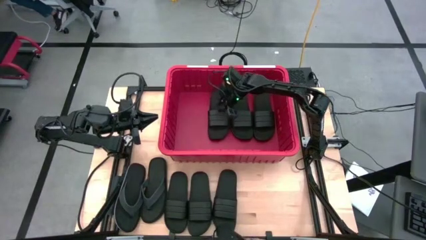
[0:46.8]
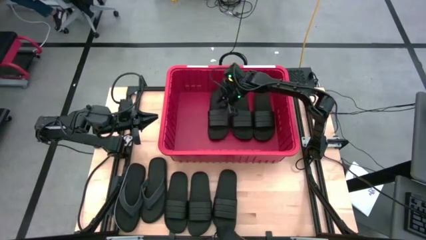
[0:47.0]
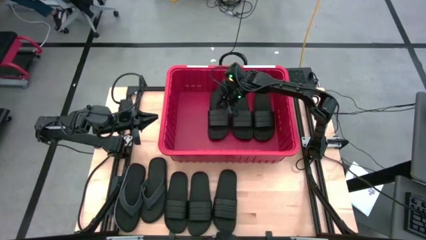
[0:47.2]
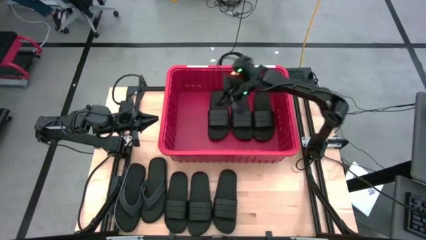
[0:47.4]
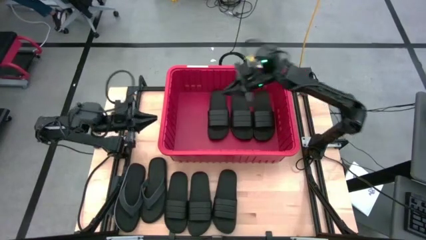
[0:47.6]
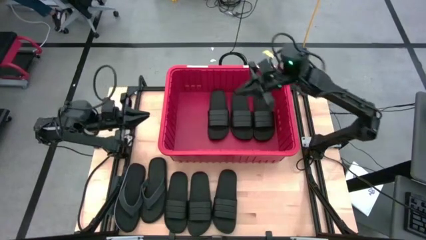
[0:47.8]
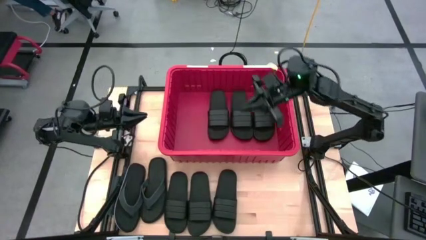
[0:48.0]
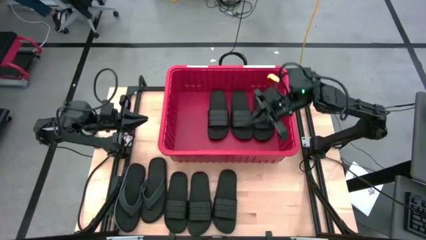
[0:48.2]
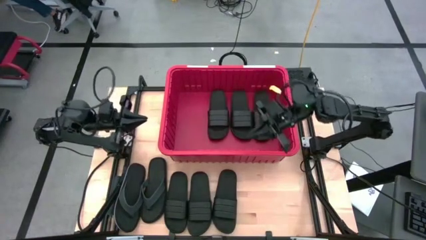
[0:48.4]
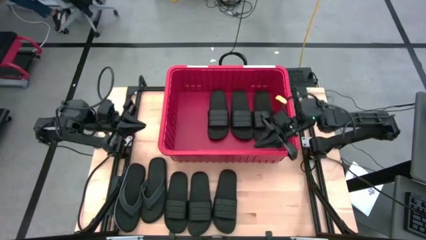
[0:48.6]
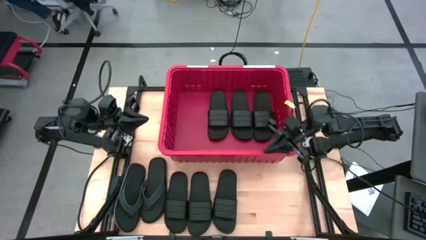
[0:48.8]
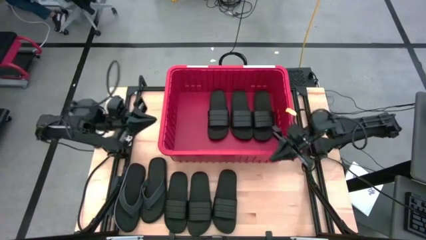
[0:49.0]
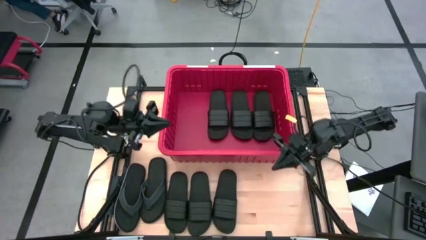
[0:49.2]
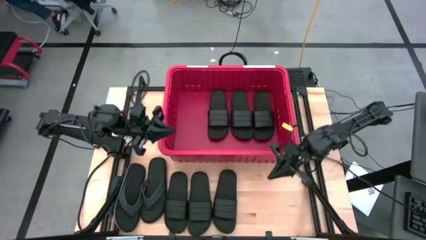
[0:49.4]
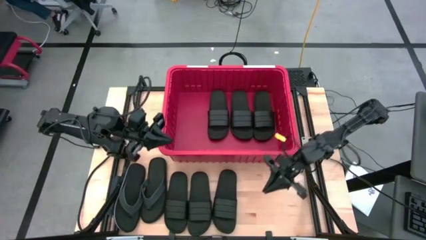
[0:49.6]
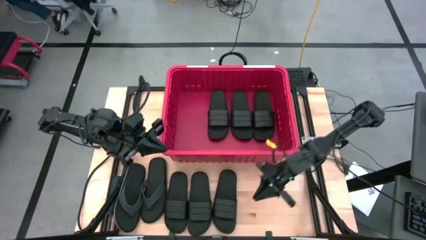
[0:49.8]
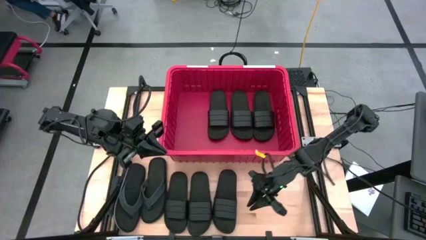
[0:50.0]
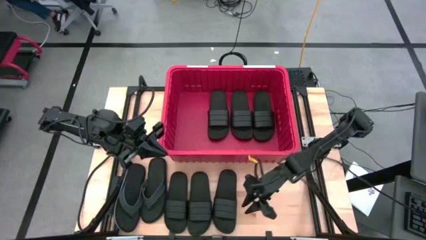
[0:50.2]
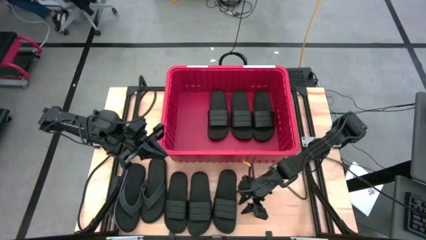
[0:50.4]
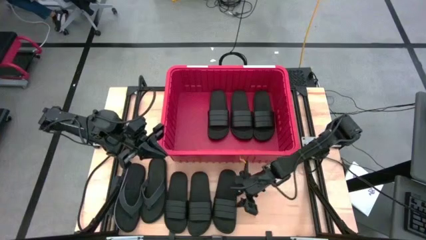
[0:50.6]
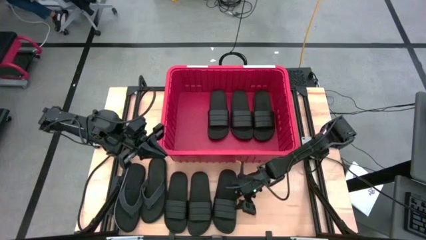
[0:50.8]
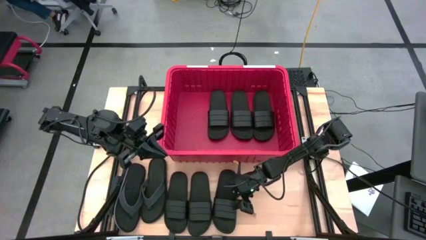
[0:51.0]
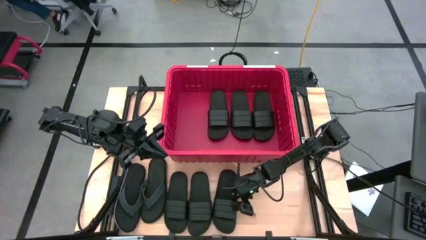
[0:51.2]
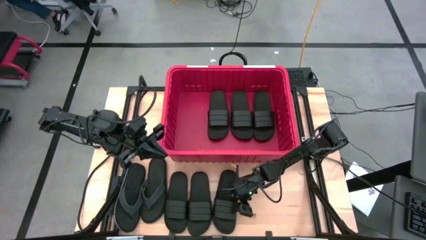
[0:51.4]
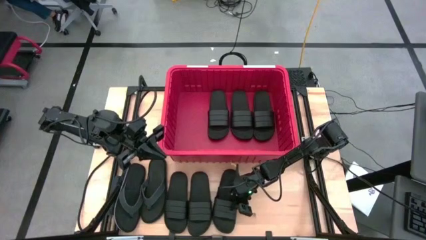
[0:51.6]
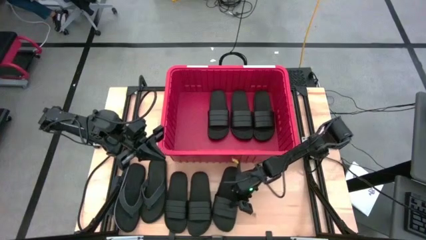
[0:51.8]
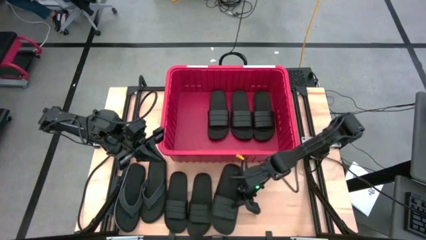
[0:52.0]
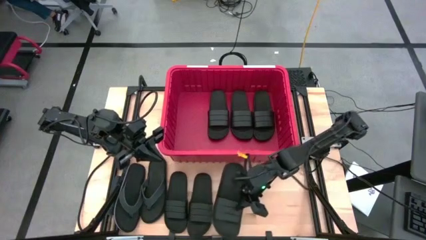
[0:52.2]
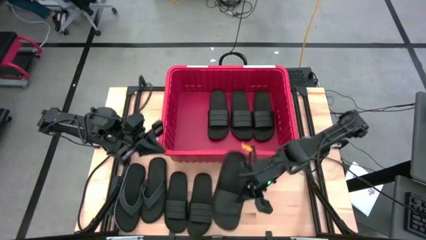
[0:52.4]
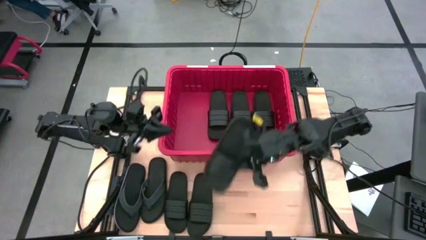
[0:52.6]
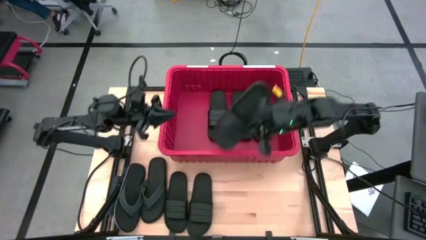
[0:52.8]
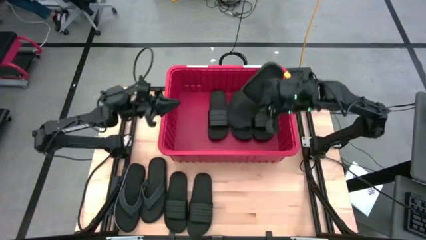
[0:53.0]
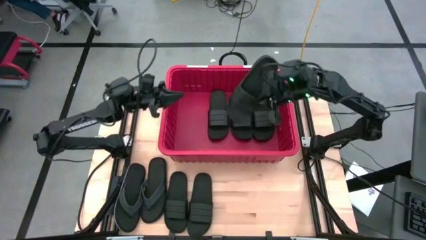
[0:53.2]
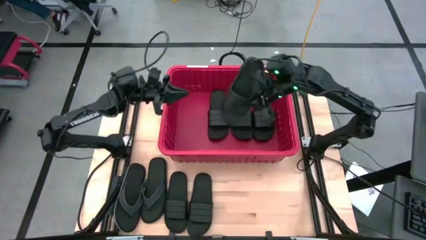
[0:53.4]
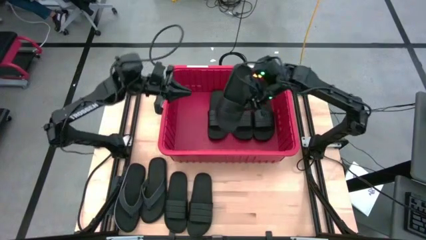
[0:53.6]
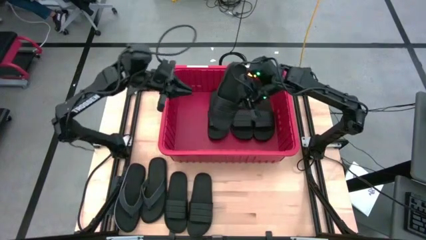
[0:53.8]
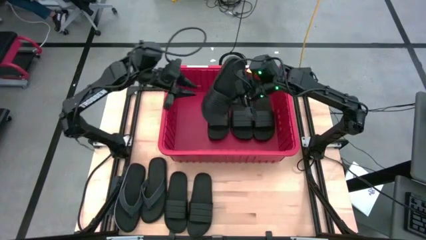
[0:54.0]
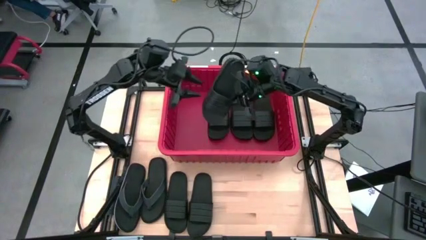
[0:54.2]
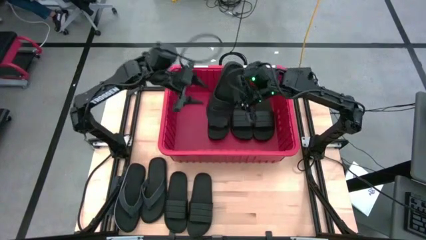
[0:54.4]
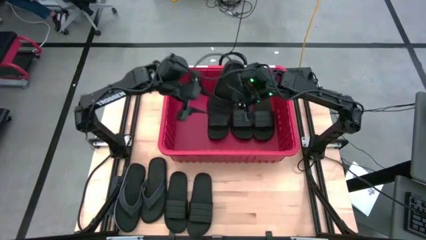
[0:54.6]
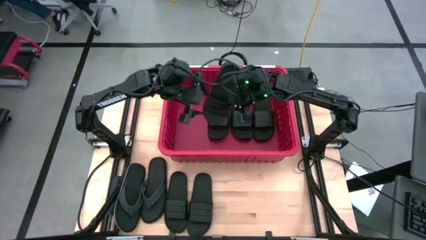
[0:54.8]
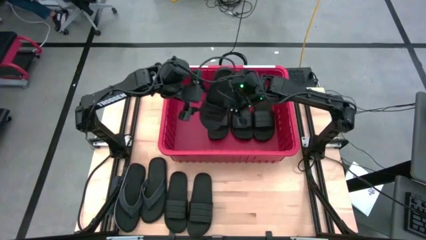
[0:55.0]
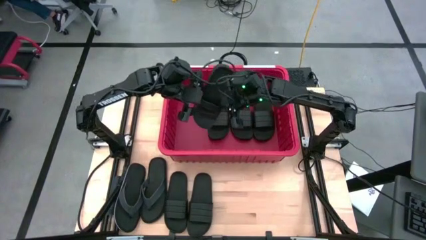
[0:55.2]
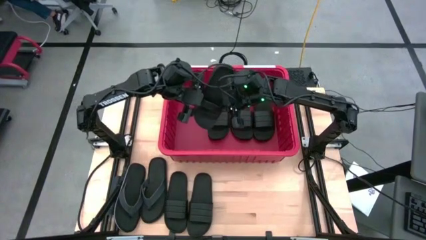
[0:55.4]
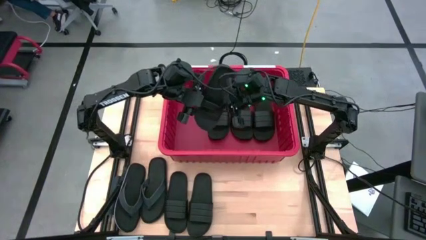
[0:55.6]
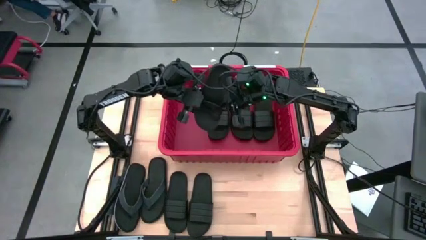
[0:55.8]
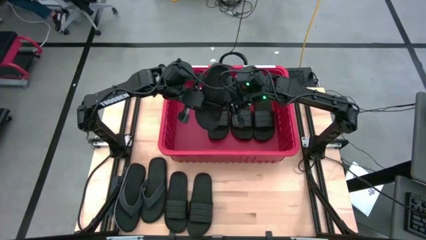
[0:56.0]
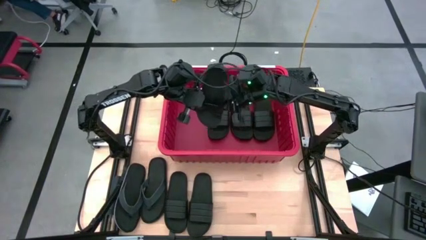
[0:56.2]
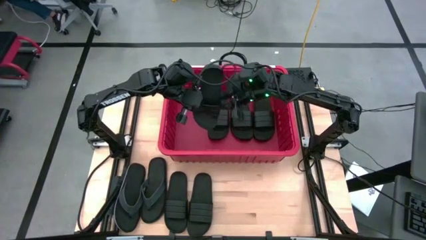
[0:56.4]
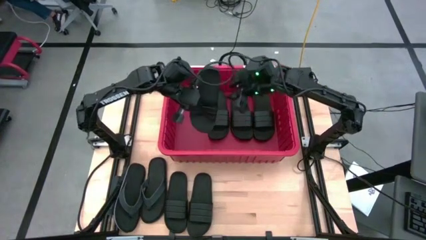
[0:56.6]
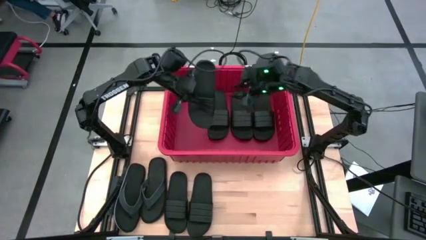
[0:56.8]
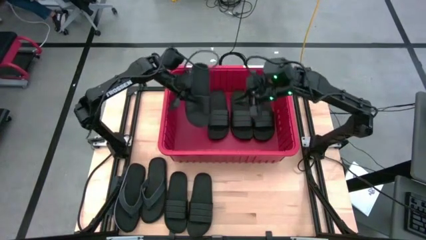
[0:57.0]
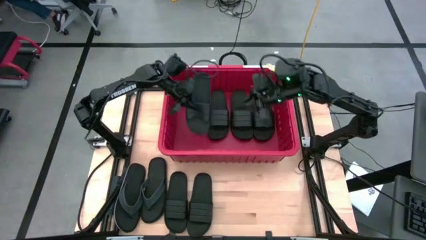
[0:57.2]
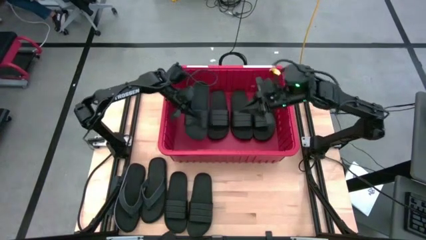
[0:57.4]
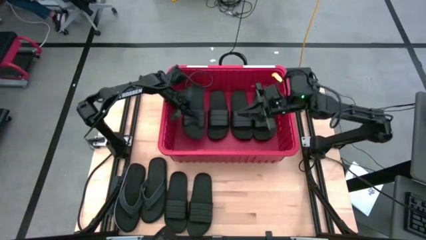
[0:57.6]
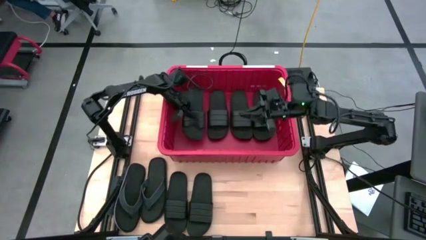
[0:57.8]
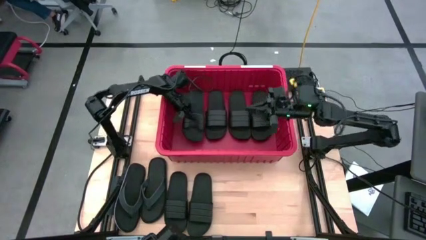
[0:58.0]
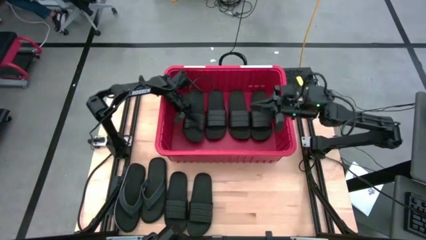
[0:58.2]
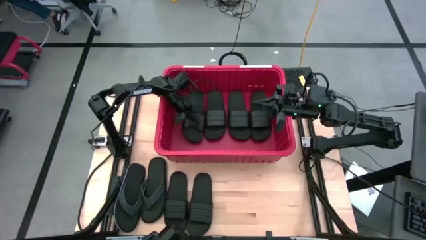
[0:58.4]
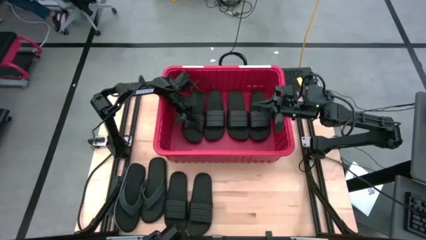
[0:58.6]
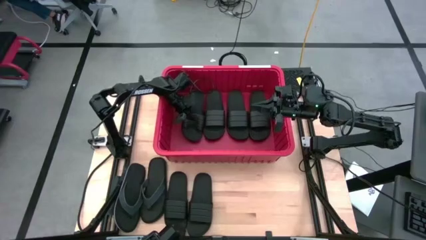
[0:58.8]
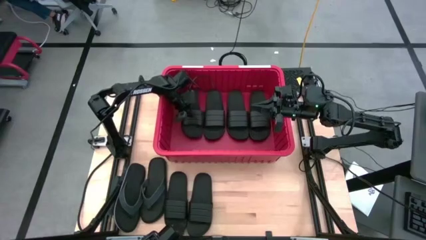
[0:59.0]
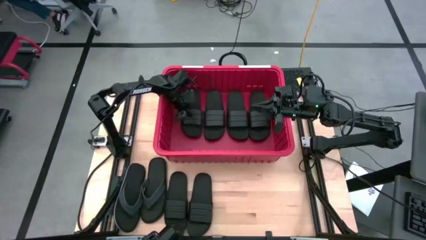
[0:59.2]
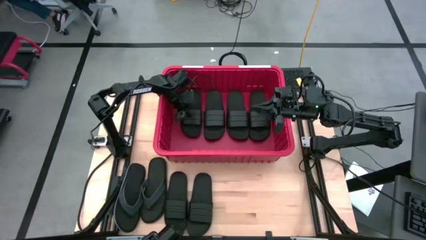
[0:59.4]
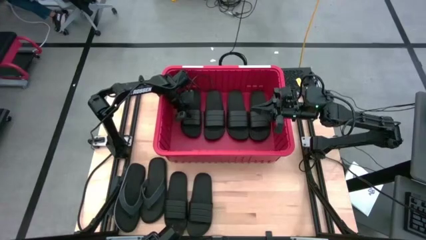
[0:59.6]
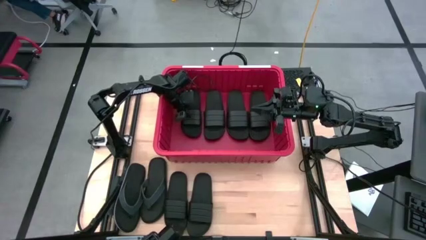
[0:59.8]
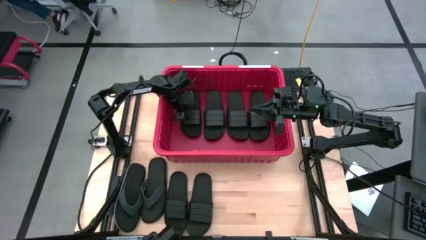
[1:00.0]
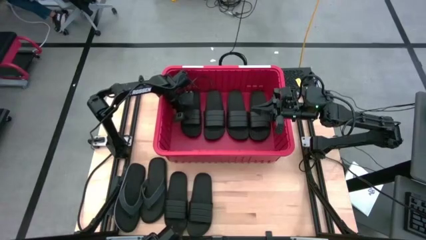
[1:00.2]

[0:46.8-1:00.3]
Task: Pick and place slides into bin
Put the black slide into the red bin
